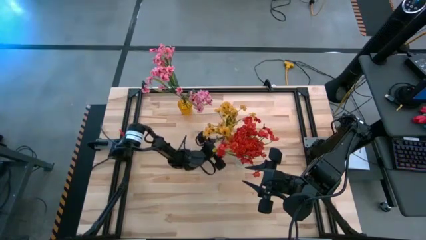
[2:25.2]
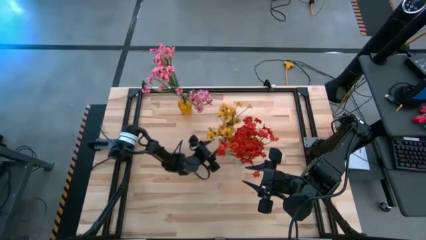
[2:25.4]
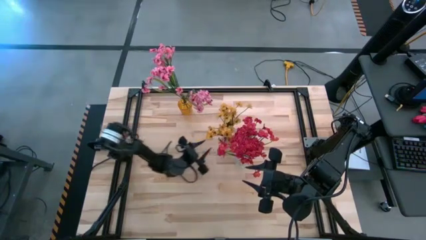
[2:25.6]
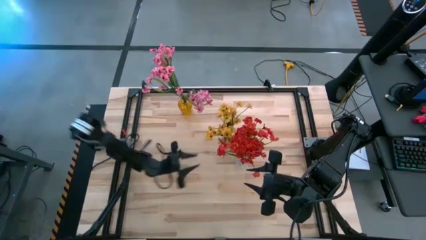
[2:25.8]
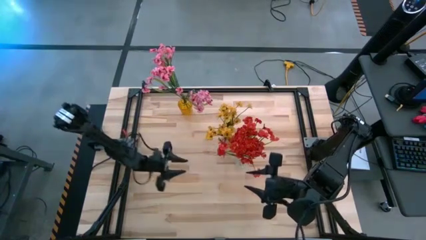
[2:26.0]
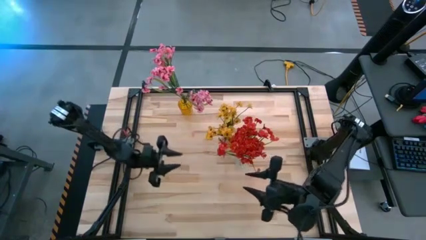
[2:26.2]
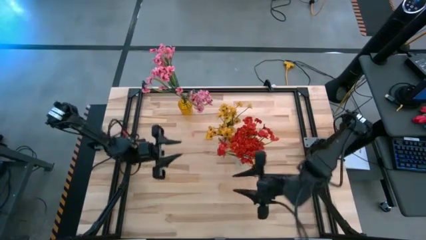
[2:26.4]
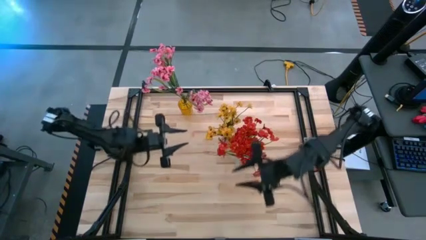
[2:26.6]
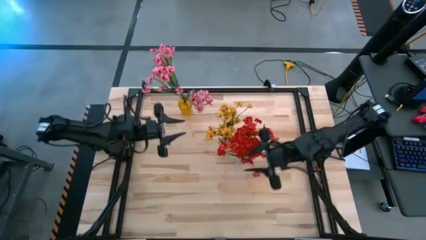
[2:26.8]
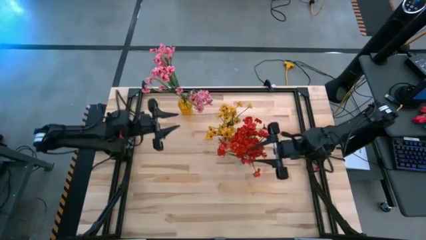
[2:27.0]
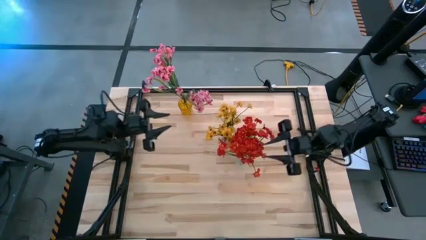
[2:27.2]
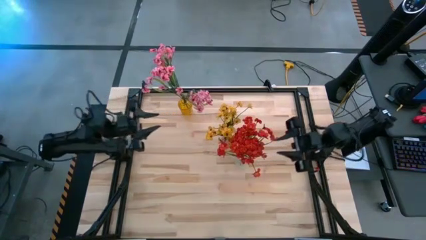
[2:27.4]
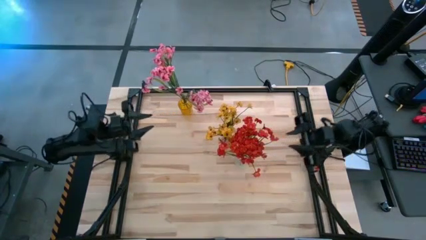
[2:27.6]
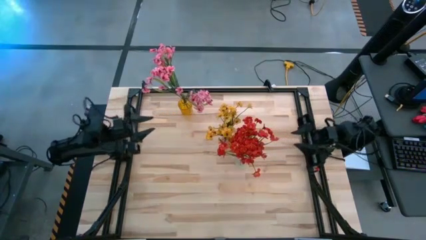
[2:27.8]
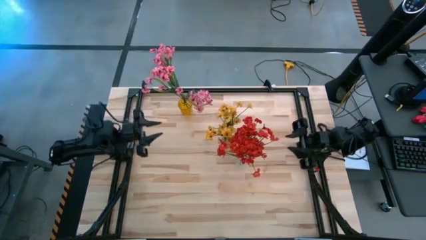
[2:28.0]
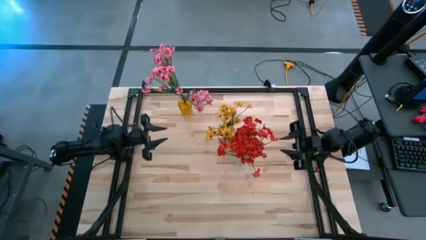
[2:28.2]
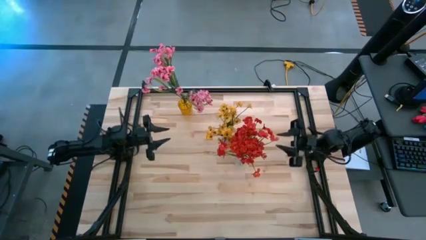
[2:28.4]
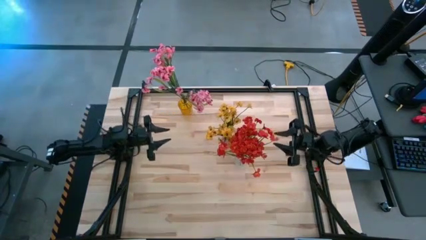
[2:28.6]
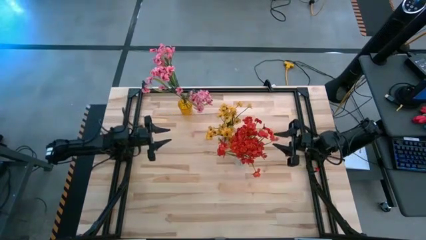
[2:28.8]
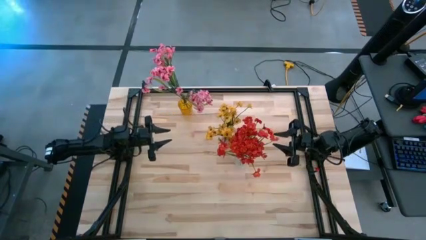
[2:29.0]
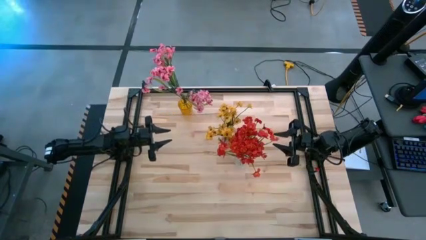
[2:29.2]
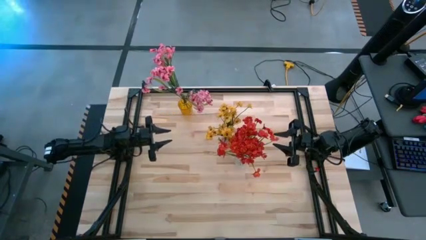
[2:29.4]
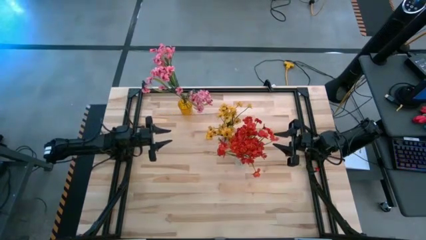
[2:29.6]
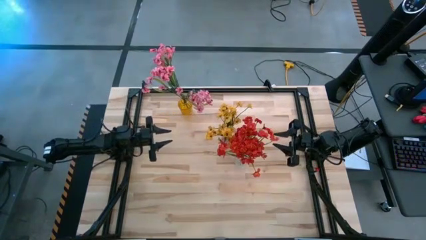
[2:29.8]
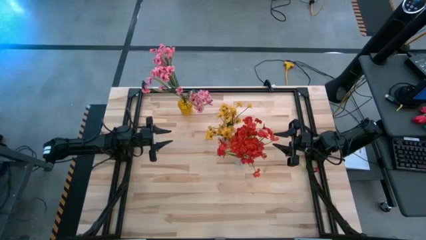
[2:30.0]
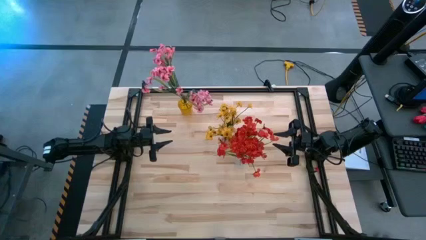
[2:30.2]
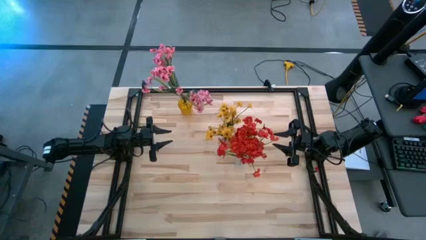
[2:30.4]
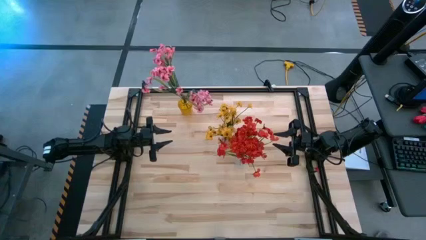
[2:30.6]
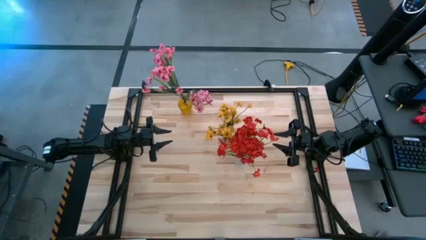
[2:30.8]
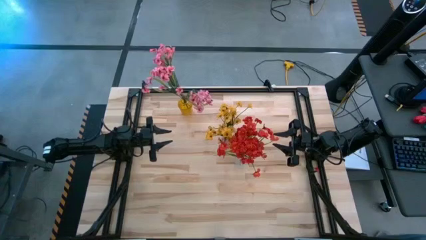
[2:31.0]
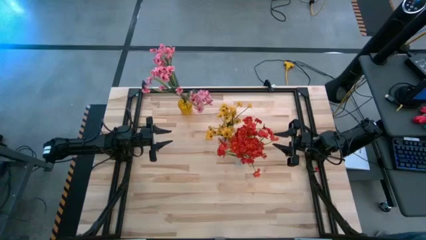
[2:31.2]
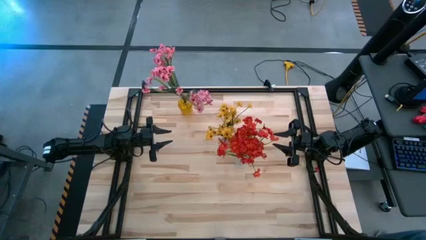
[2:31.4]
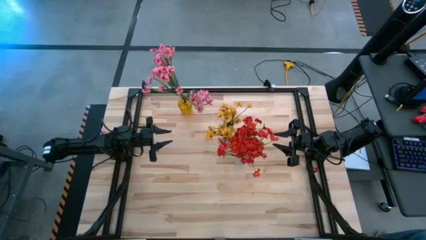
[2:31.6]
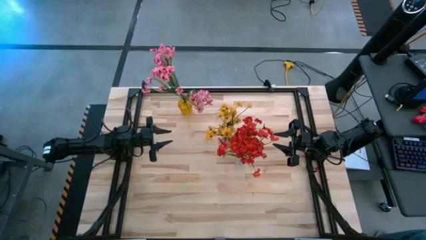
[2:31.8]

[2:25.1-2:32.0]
Task: Sort flowers into vase by color
Return to Home Position

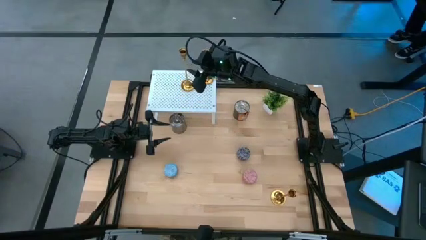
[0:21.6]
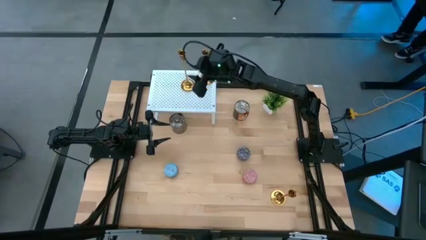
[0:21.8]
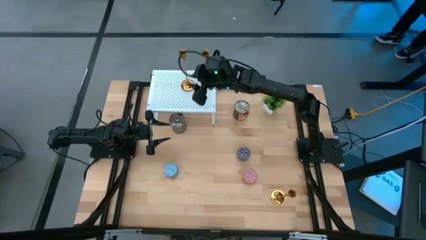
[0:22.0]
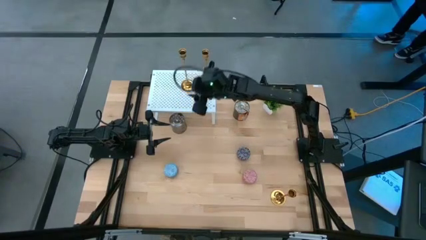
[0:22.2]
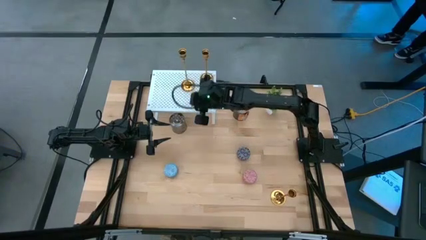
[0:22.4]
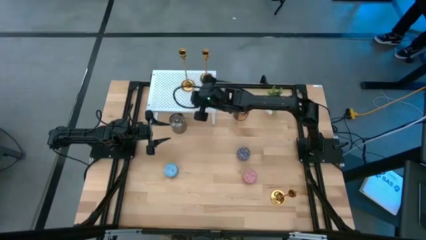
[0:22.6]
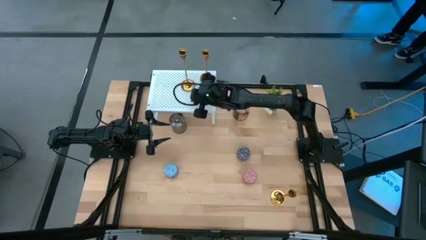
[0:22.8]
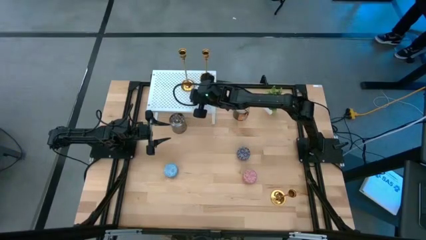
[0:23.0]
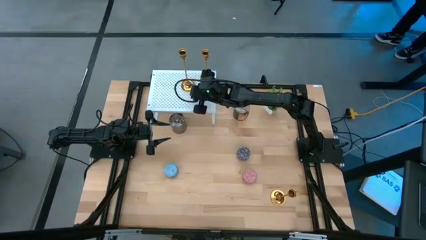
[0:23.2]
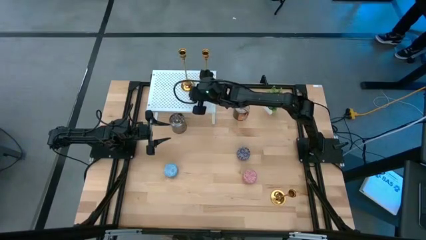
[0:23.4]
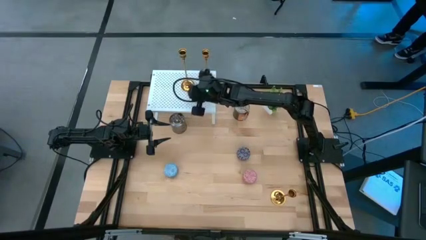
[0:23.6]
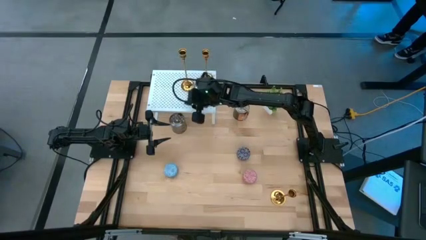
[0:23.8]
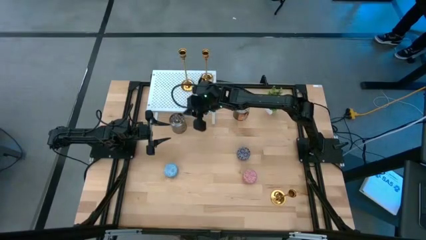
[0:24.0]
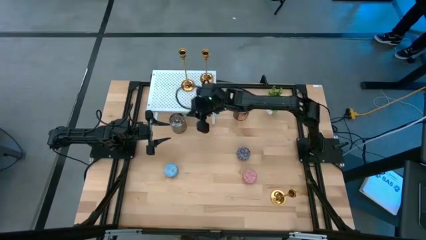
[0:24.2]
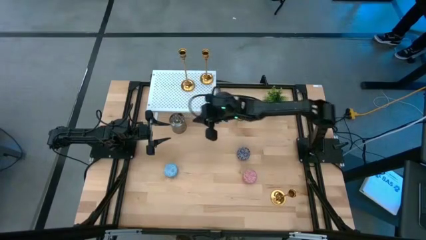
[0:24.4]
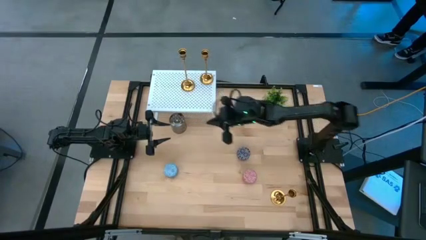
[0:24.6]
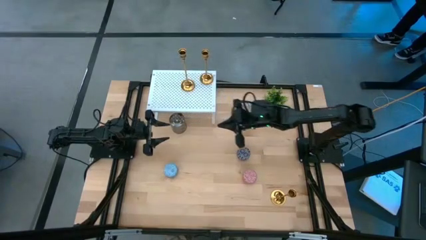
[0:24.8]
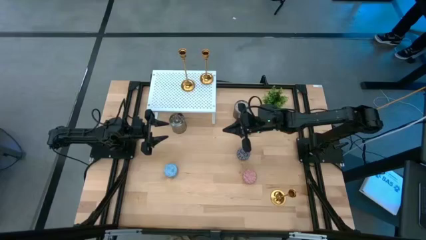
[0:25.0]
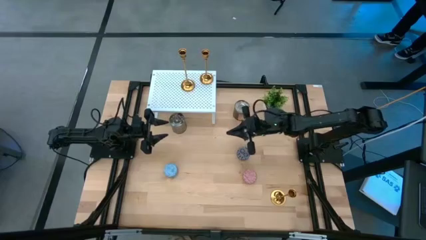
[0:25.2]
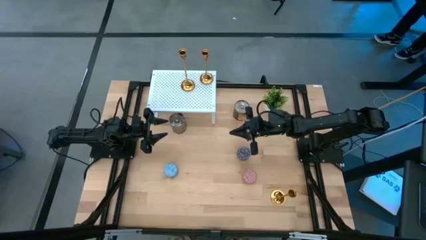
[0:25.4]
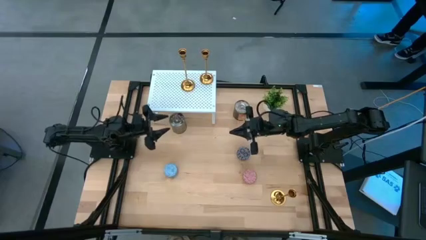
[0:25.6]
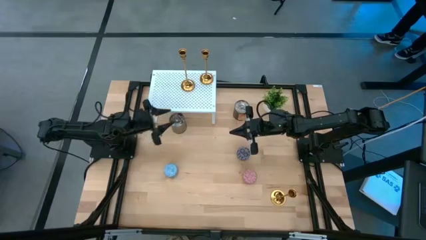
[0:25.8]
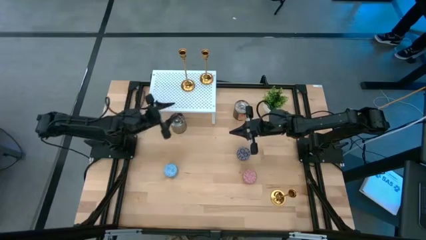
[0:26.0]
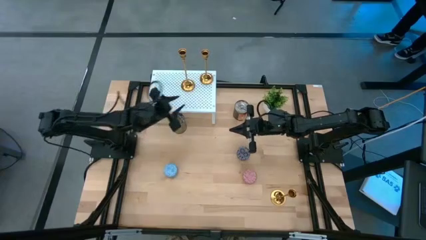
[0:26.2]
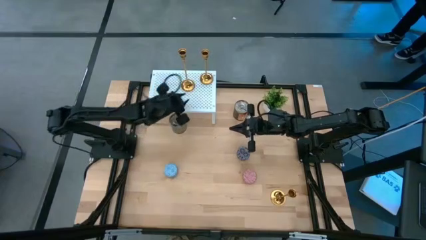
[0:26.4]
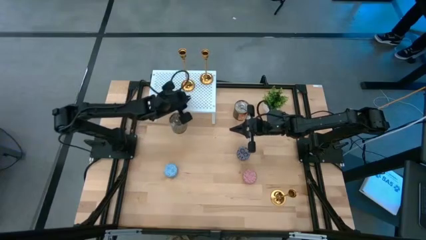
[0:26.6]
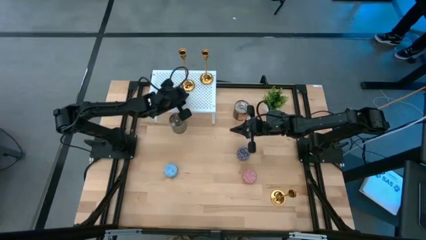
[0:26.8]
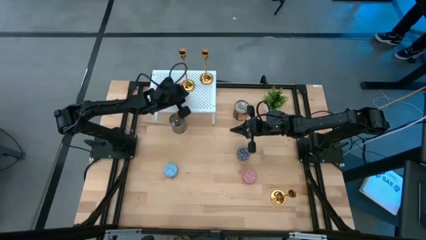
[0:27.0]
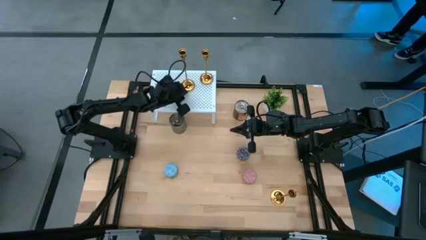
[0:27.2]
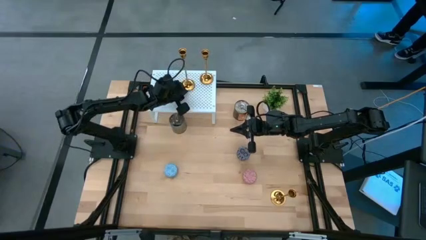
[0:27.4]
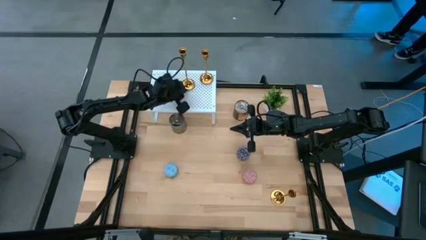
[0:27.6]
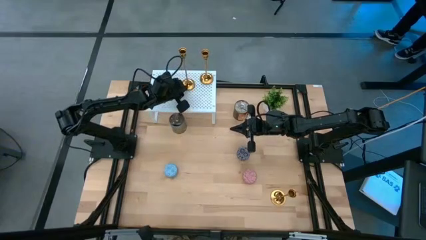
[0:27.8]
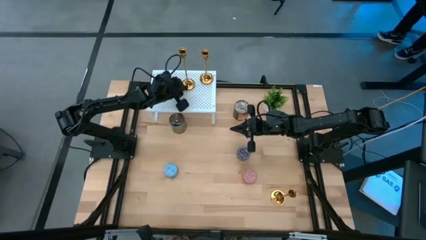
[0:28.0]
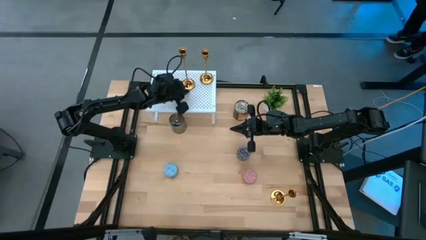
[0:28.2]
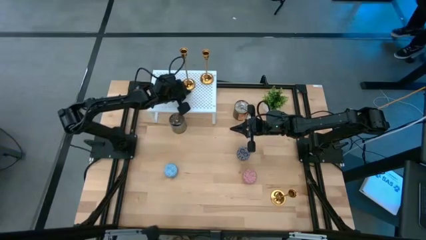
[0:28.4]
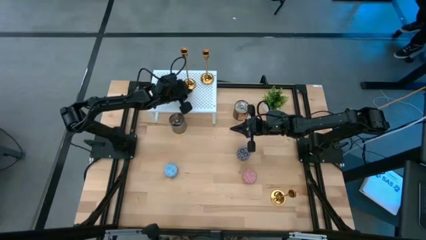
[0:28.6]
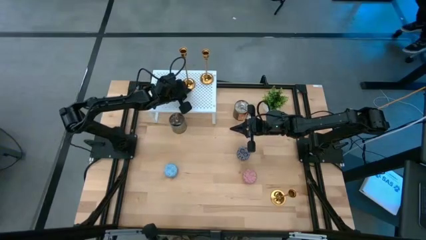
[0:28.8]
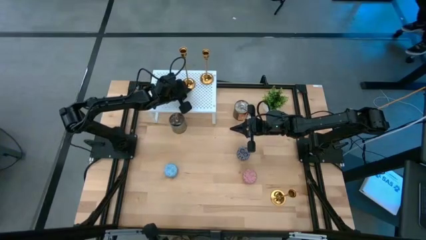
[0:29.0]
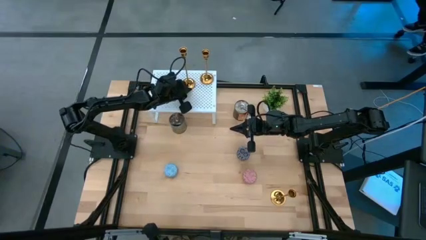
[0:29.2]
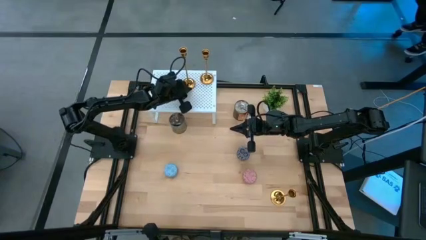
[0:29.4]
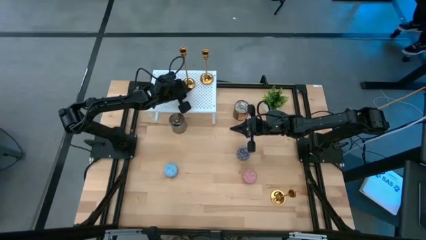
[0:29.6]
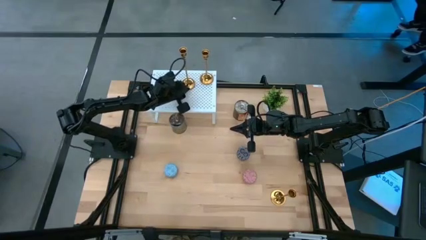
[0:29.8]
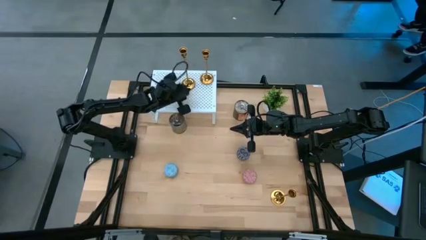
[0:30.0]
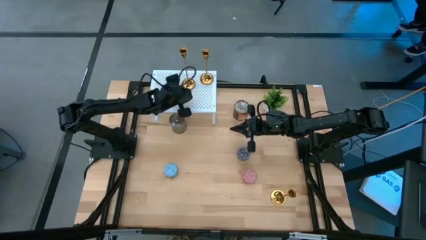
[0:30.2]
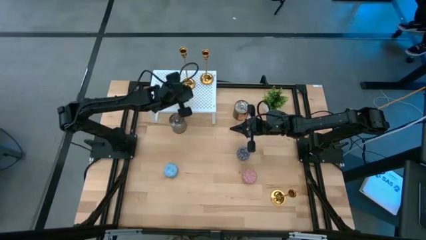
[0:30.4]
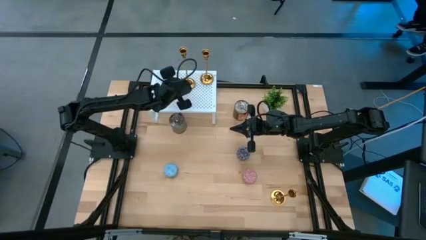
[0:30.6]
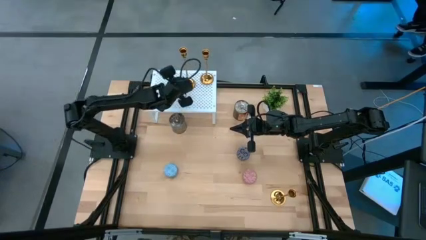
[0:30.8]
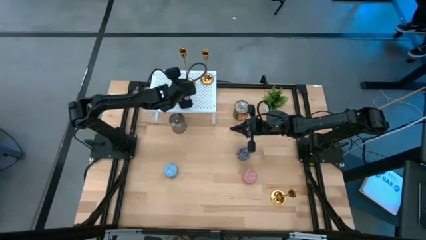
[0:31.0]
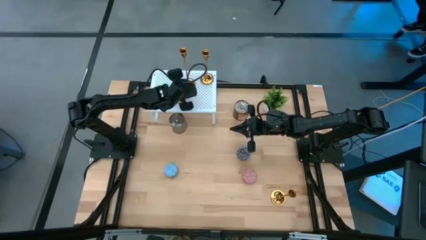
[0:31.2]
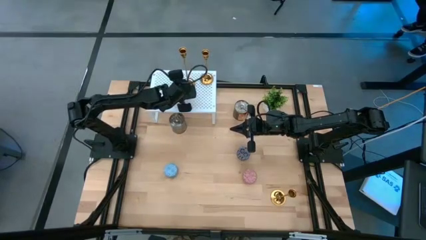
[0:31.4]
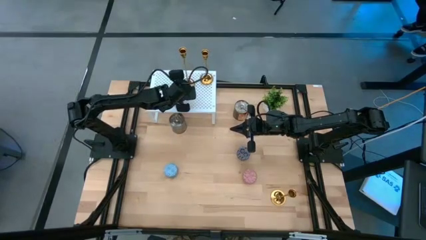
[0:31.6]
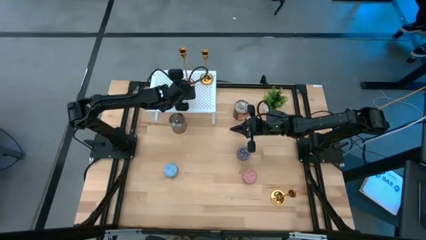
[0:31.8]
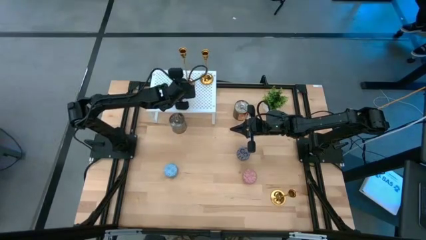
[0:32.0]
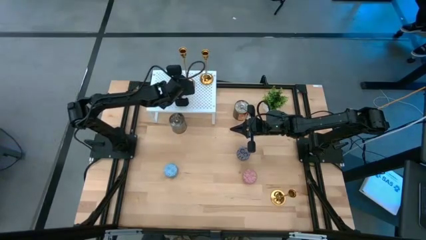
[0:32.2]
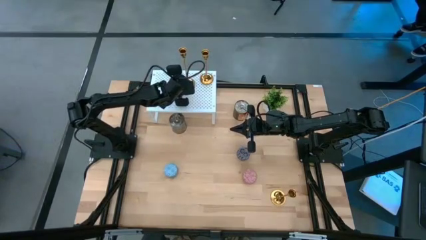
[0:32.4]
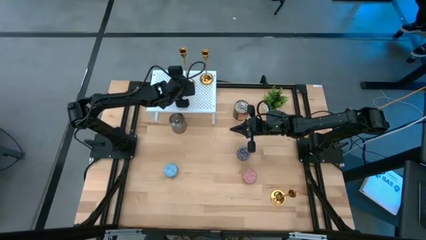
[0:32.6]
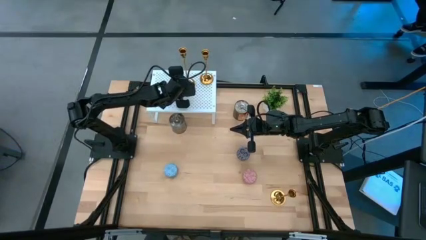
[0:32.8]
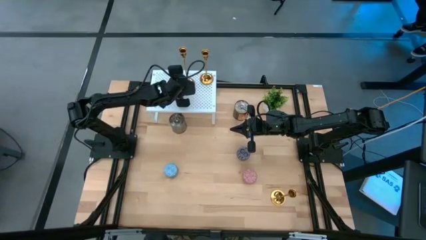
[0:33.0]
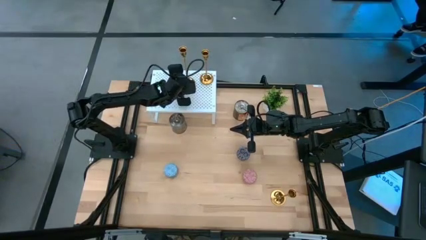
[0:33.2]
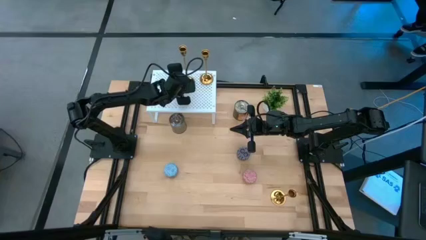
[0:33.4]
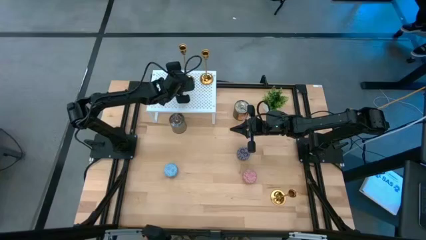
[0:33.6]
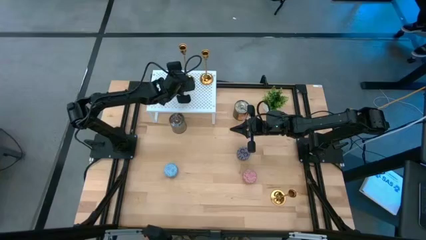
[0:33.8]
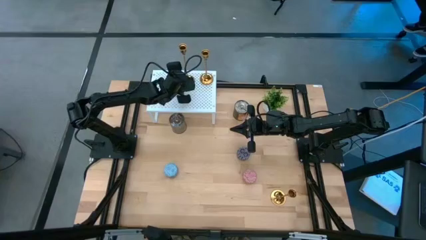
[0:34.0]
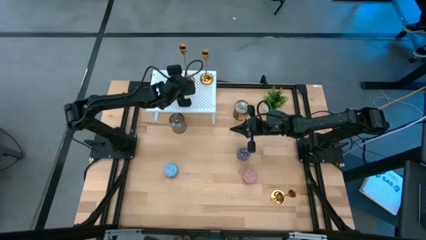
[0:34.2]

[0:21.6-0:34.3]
Task: Pick & Place candle stick holders
Adjust the left gold candle holder to align with the other gold candle holder
